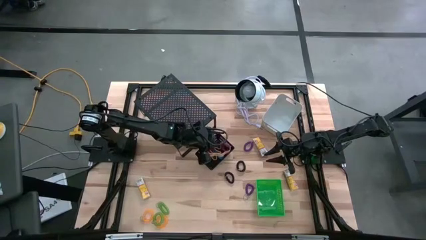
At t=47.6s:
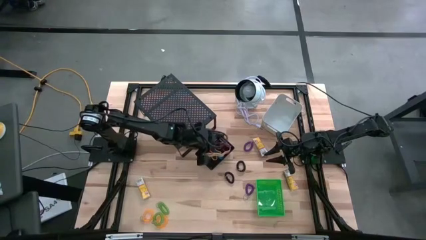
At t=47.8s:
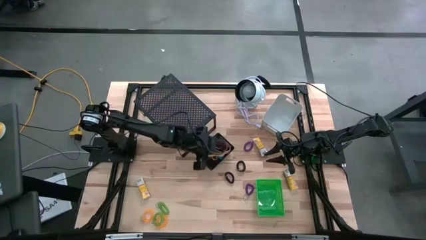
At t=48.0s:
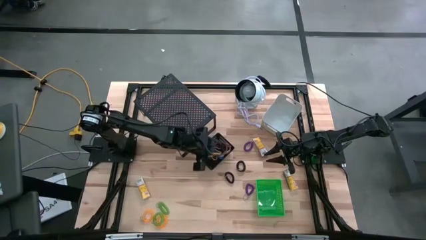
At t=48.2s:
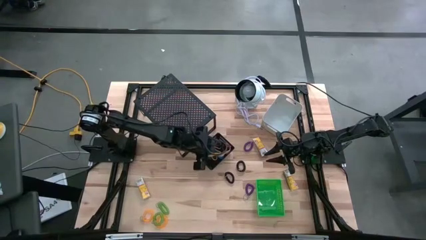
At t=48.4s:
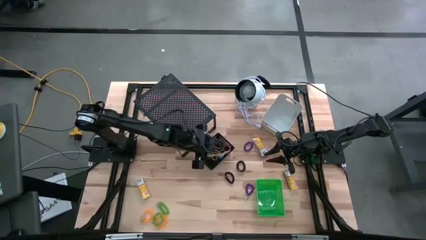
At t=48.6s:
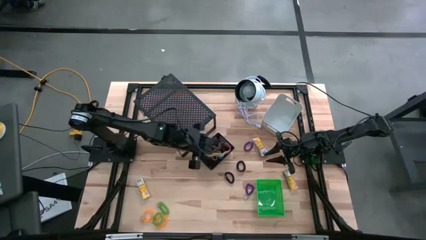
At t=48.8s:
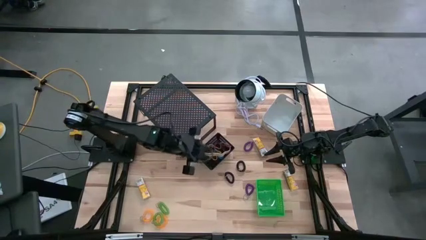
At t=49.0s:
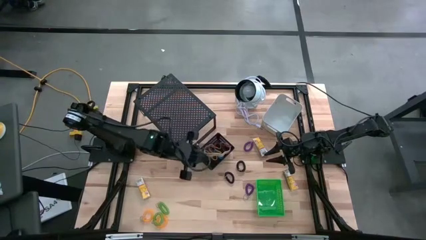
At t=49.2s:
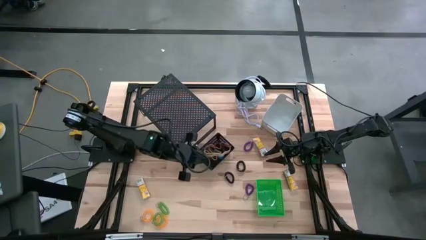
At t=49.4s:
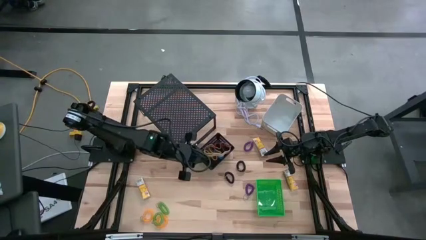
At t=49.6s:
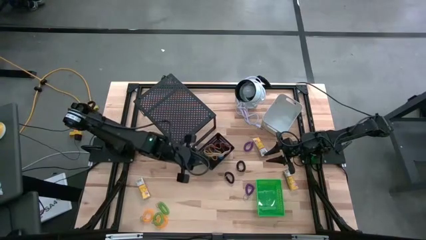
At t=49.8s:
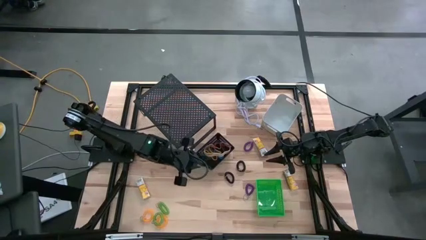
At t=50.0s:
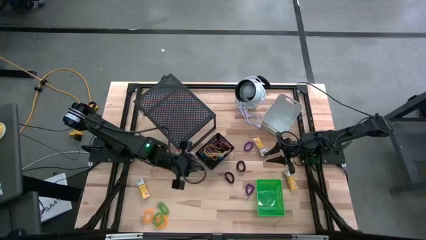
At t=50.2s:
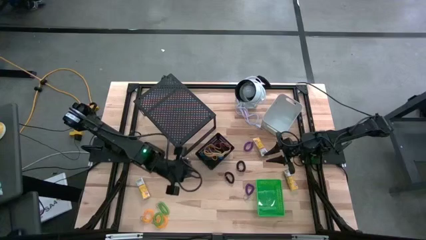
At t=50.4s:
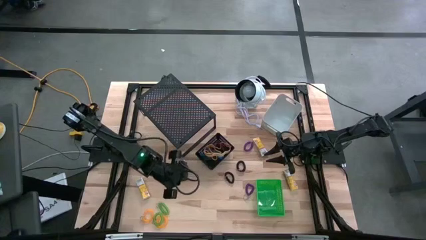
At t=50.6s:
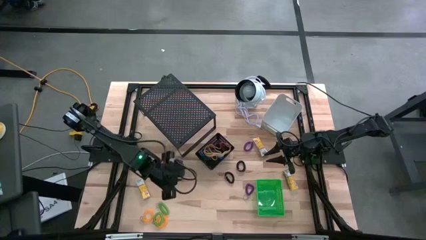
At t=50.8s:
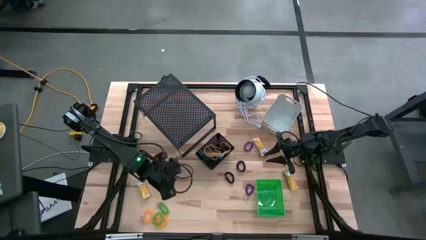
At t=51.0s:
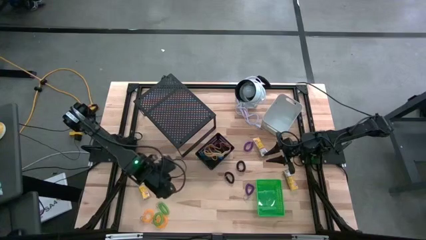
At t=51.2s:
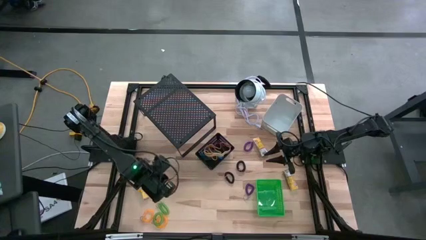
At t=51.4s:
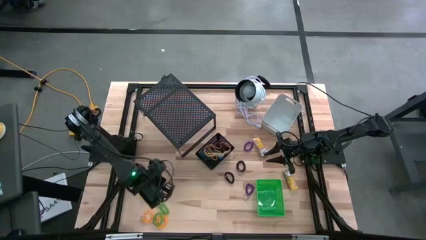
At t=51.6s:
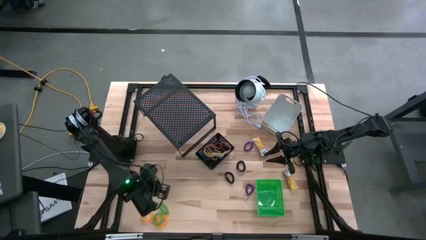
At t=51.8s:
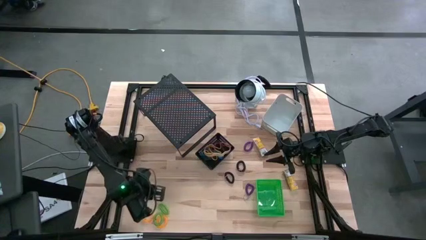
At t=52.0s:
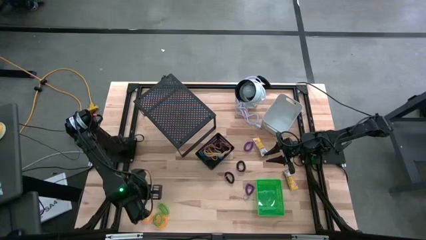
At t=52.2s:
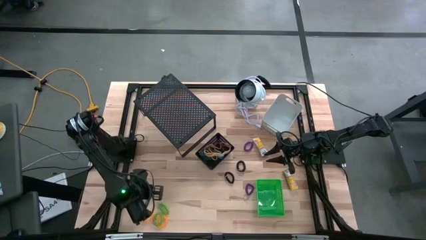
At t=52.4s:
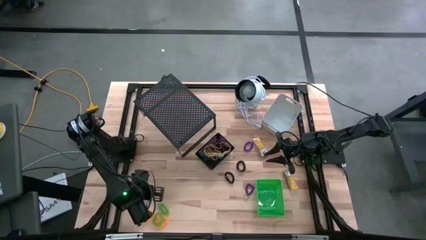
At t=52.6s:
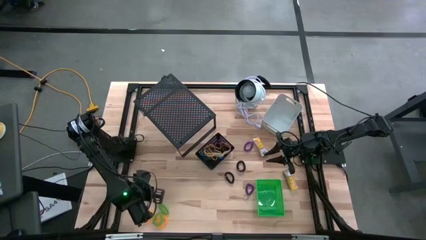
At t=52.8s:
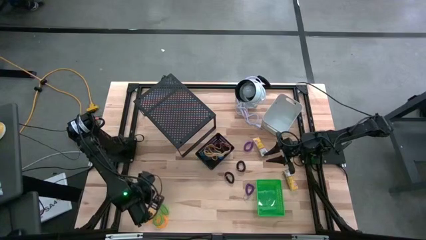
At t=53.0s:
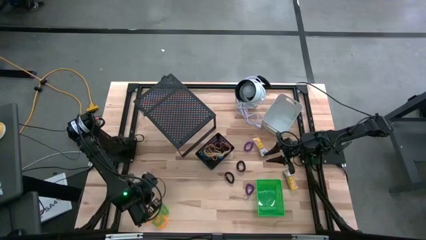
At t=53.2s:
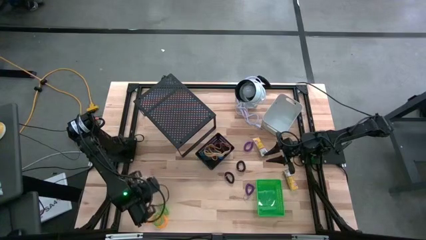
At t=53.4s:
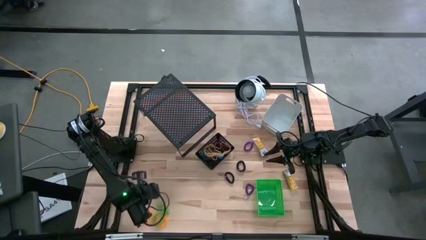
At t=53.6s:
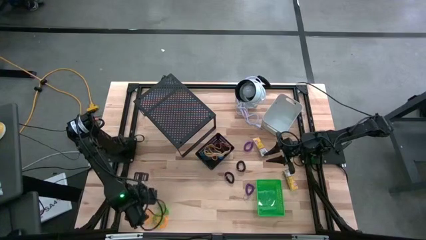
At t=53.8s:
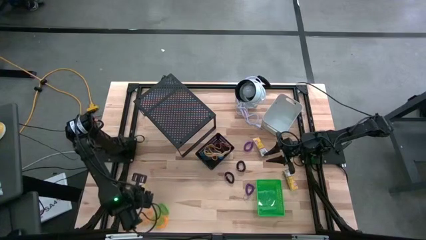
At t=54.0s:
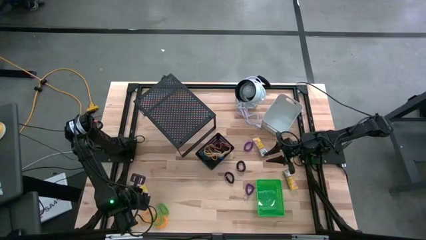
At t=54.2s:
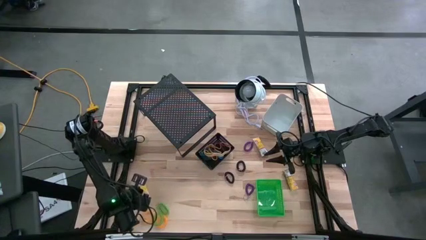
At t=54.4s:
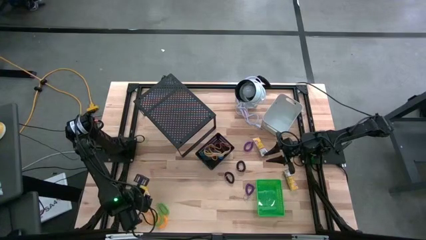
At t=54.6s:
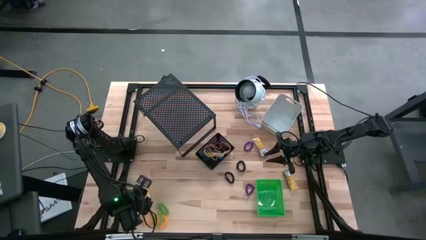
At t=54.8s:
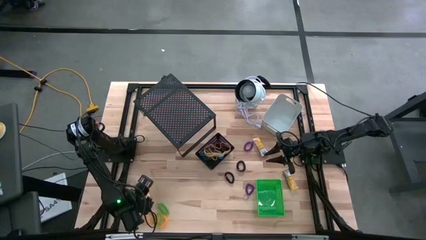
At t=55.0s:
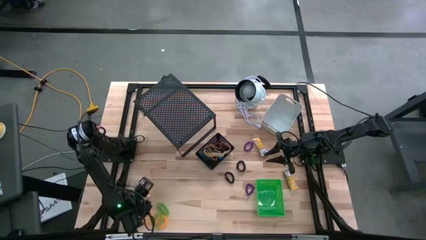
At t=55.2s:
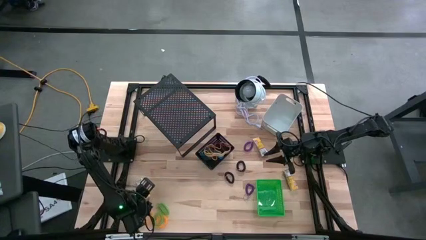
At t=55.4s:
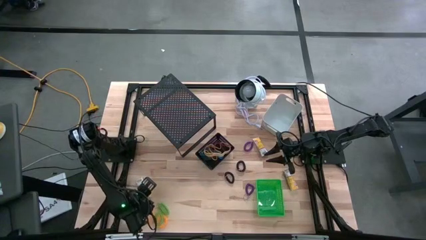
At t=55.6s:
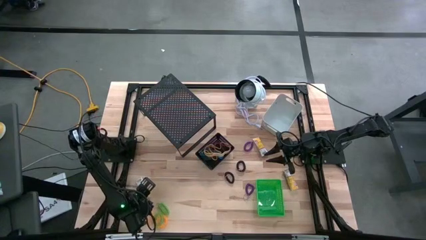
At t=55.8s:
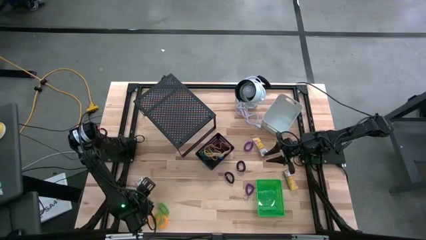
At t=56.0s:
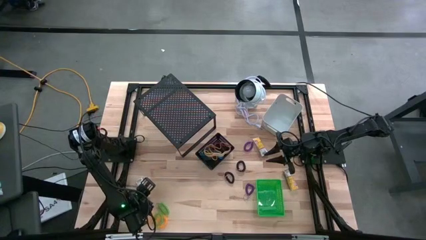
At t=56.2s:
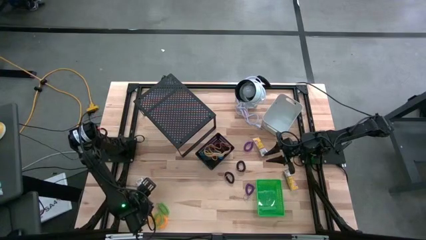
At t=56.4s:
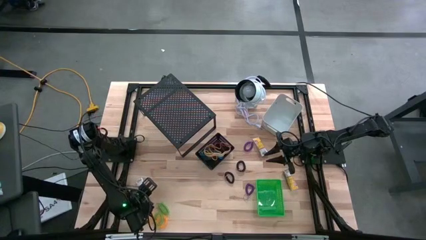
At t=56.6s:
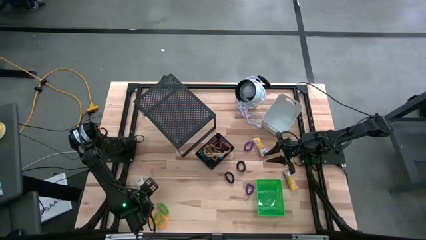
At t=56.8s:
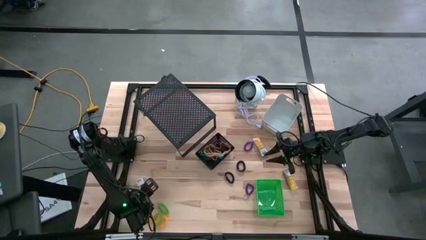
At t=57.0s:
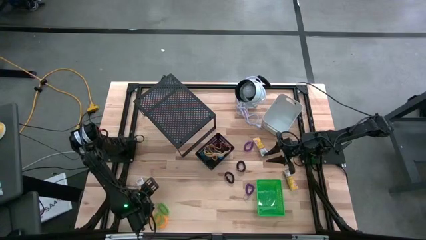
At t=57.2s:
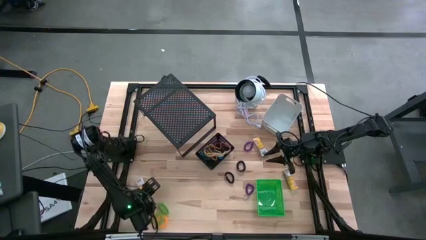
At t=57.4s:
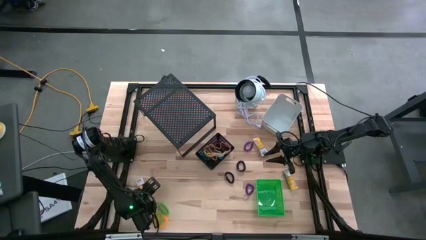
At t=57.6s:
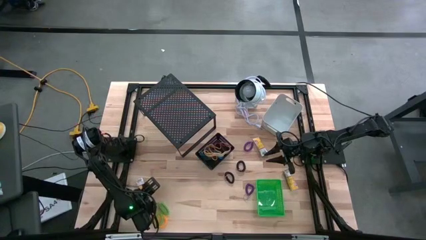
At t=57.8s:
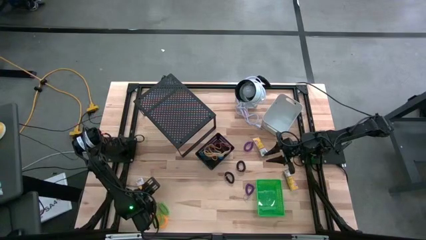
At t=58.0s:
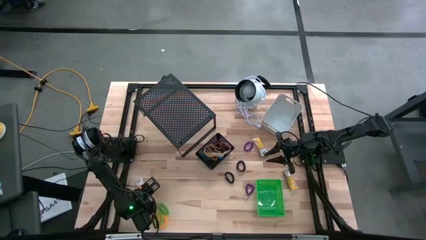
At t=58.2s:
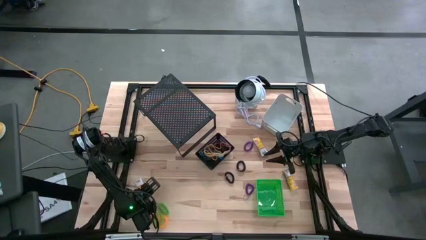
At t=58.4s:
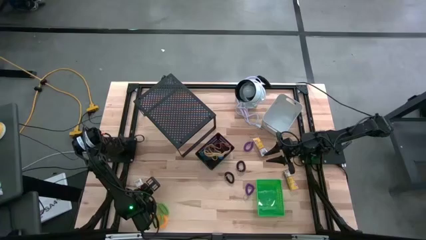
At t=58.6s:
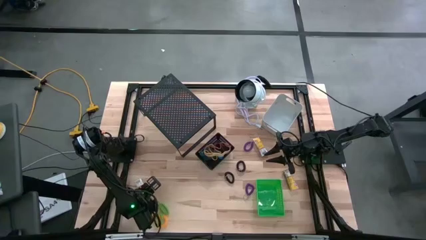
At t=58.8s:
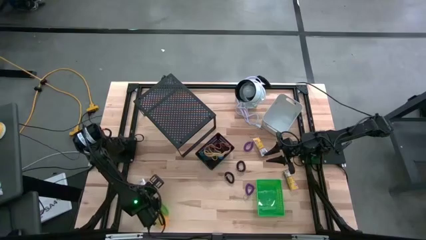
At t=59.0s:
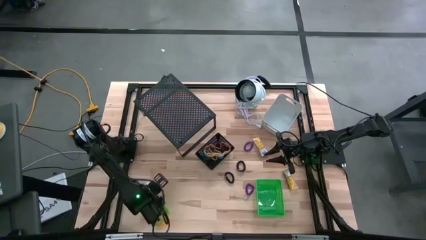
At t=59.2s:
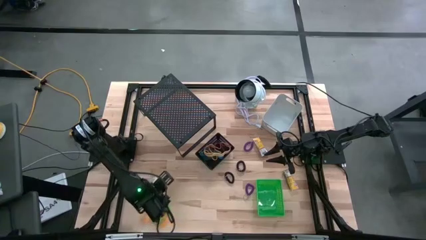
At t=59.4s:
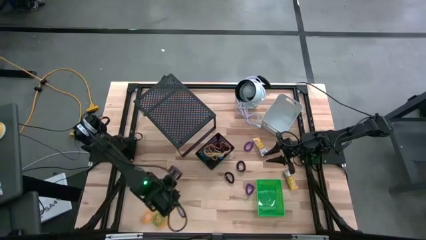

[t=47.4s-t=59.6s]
Task: Pick & Place Office Desk Supplies
Put the bottom left crayon box into the green bin

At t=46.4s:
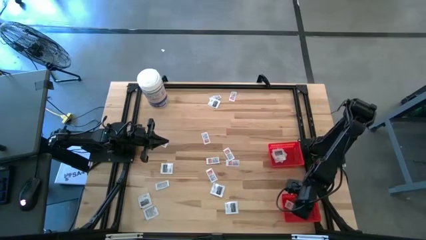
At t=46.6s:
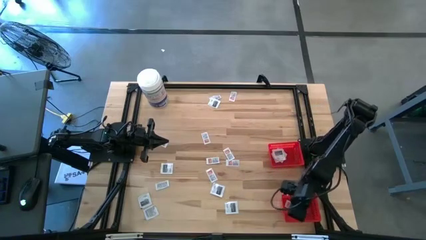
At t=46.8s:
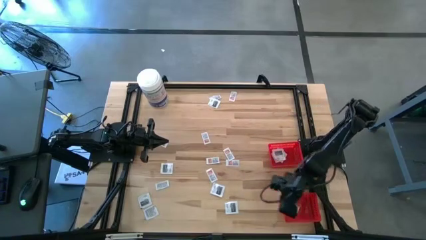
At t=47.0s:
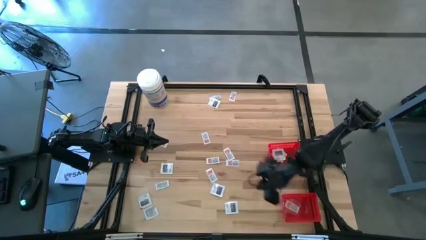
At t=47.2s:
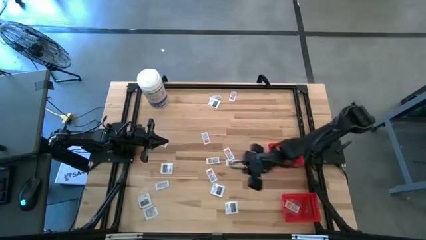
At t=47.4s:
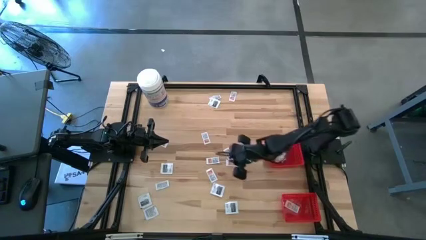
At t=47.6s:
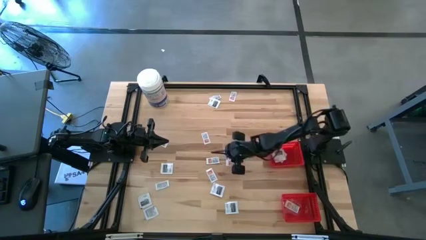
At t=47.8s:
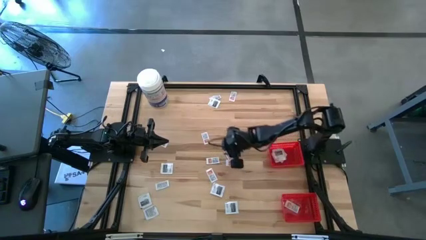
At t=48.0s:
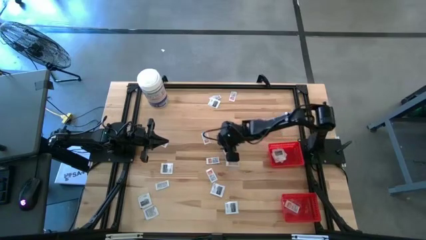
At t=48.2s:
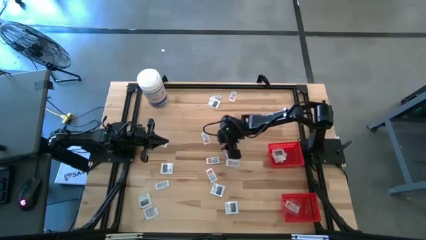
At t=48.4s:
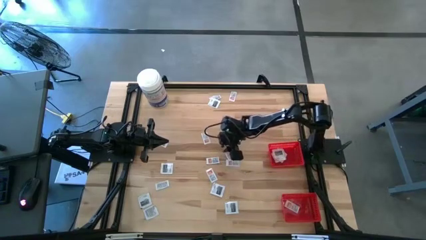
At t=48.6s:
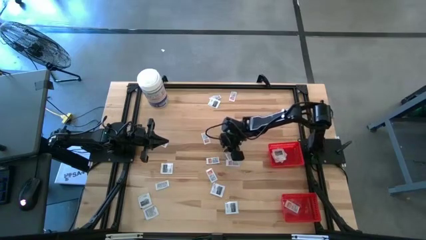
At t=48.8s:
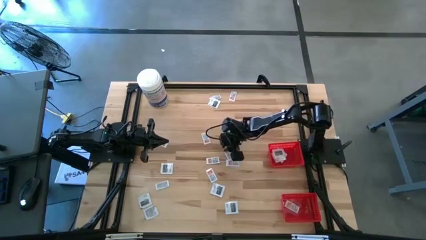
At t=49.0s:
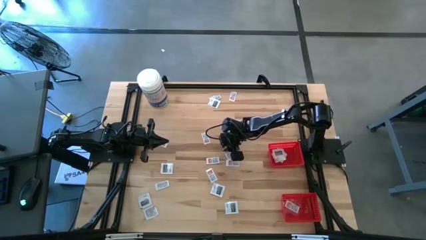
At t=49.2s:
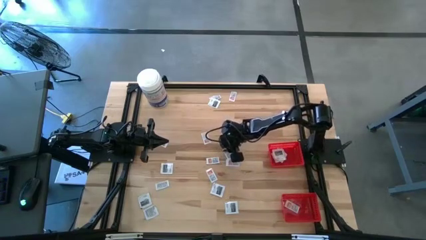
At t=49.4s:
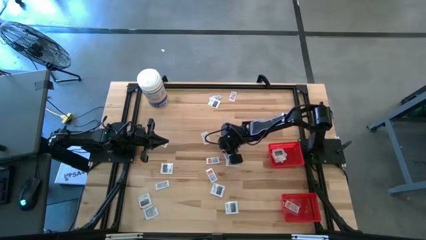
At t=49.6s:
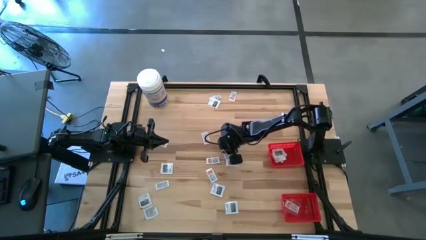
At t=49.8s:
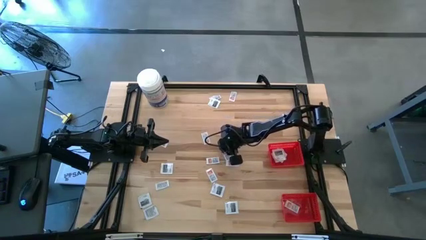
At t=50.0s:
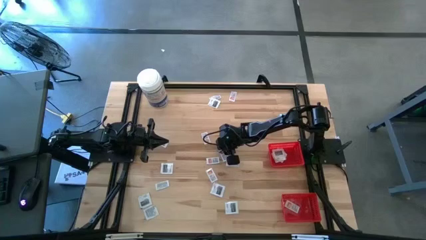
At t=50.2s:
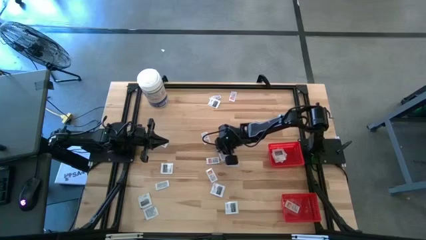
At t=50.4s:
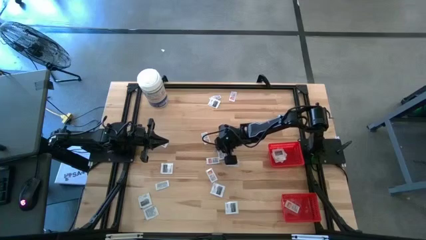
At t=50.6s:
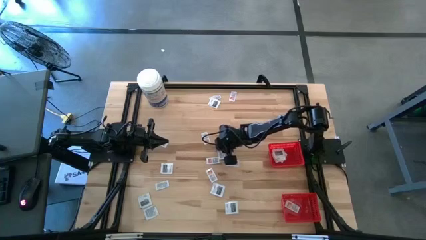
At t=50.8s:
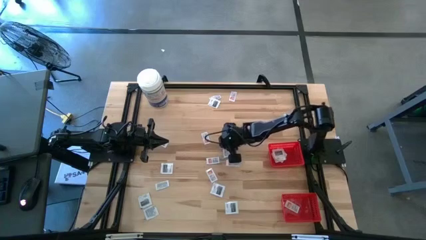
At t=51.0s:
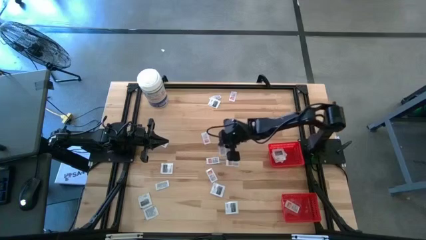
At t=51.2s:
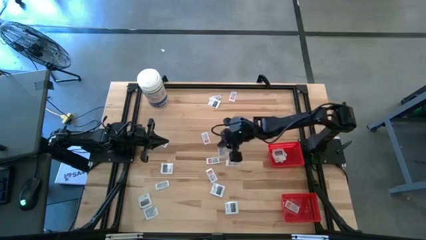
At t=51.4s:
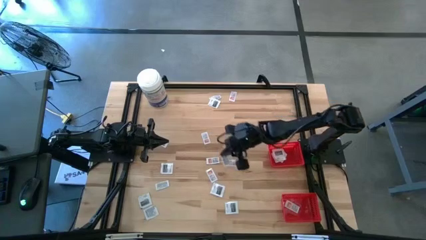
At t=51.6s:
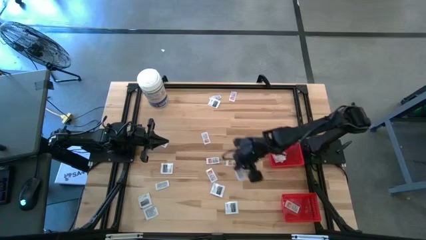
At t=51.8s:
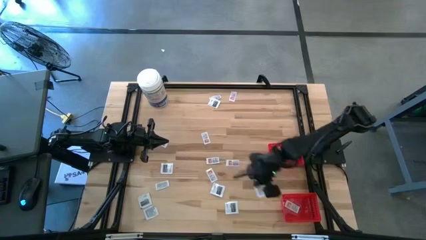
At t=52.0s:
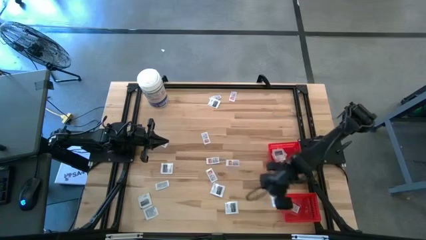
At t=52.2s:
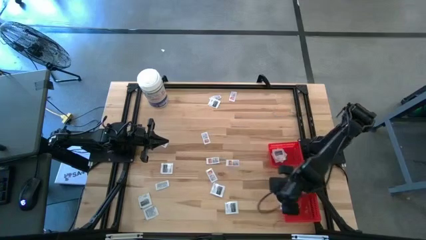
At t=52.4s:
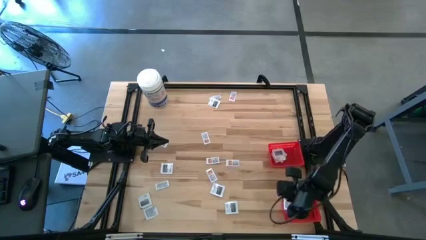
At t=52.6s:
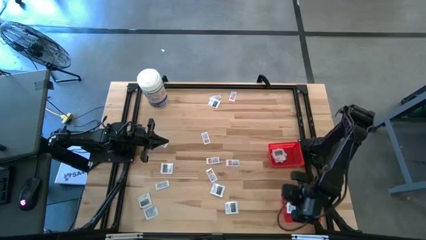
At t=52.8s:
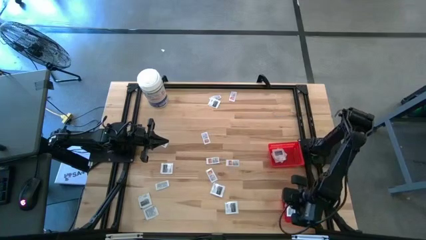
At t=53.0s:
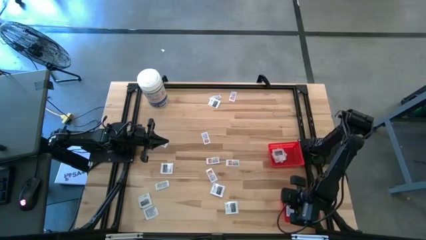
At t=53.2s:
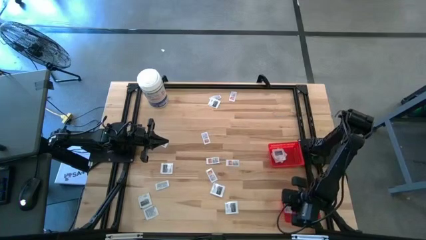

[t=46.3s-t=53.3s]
Task: Pick & Place First Aid Supplies
Put the orange ointment pack into the bottom red basket
